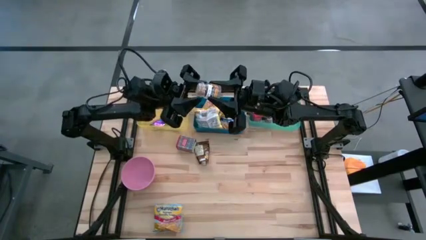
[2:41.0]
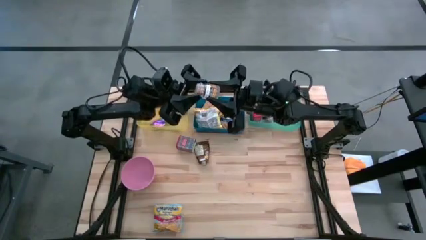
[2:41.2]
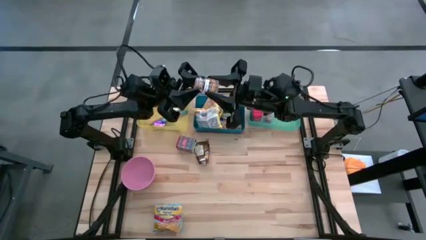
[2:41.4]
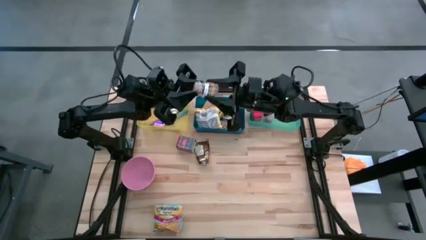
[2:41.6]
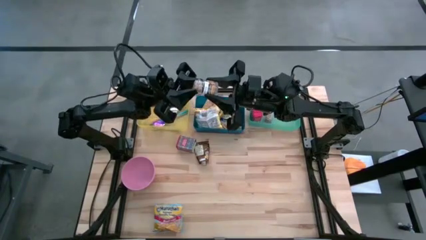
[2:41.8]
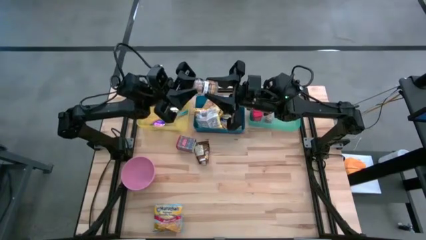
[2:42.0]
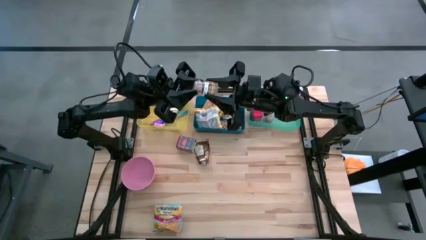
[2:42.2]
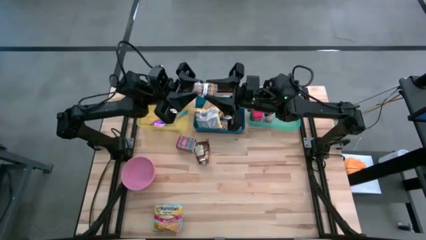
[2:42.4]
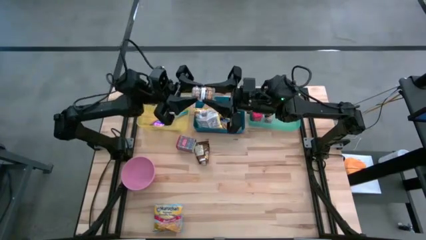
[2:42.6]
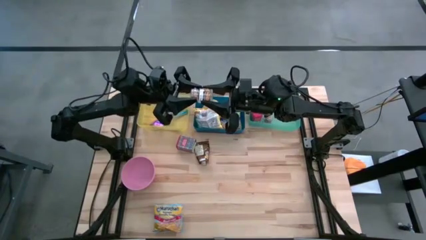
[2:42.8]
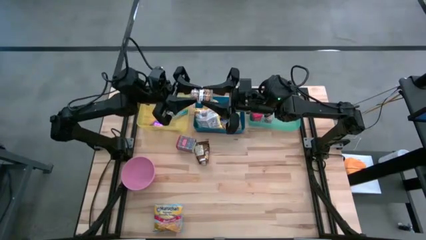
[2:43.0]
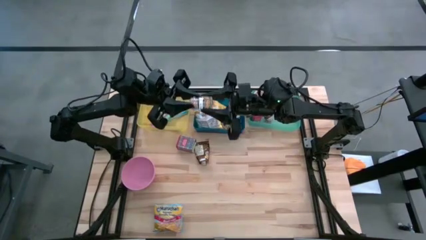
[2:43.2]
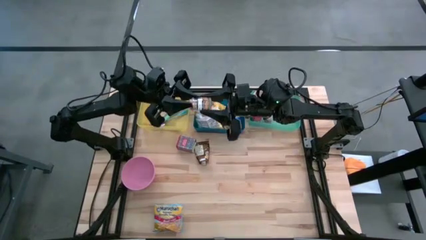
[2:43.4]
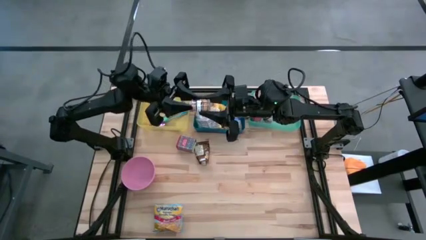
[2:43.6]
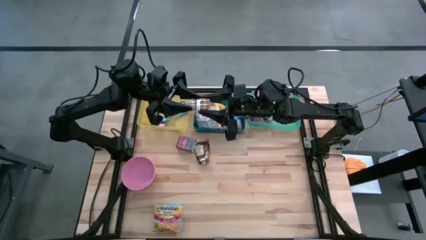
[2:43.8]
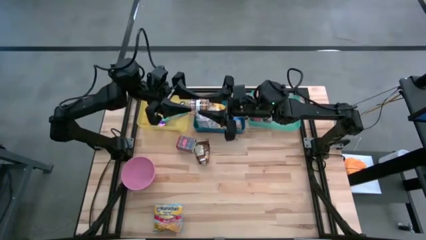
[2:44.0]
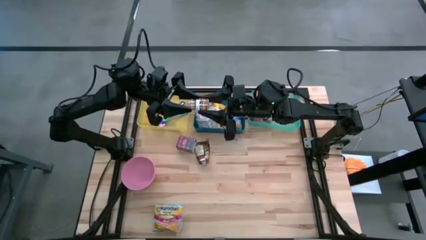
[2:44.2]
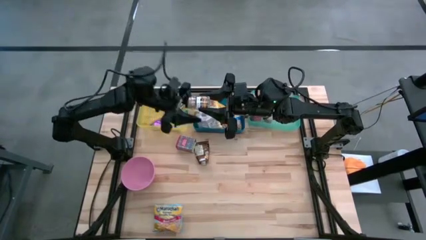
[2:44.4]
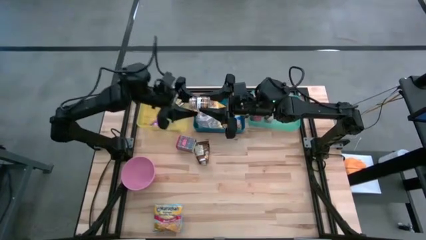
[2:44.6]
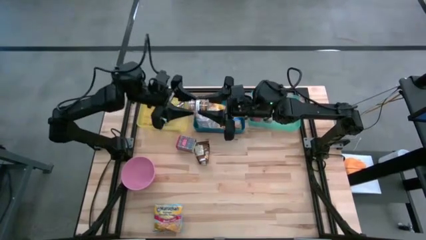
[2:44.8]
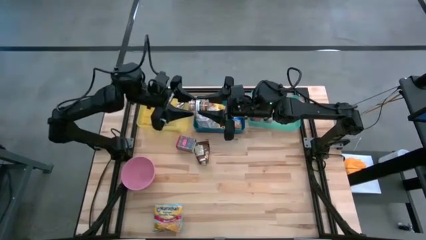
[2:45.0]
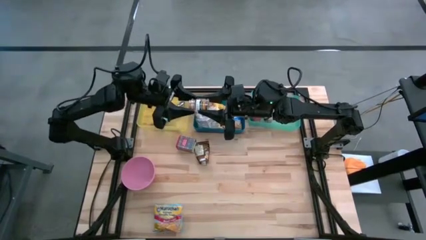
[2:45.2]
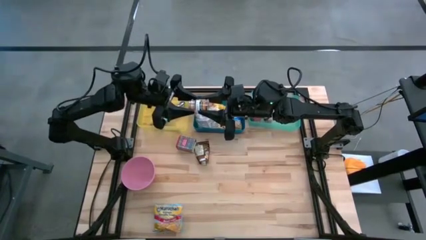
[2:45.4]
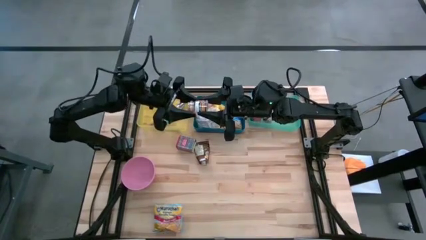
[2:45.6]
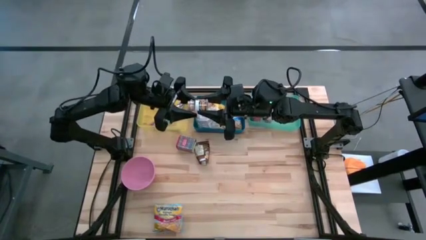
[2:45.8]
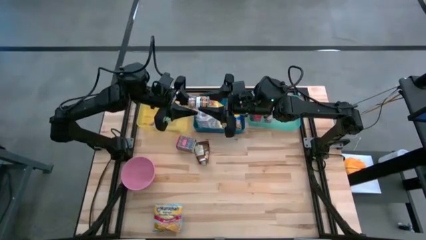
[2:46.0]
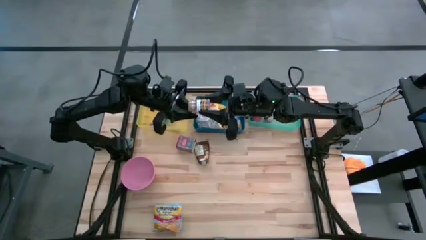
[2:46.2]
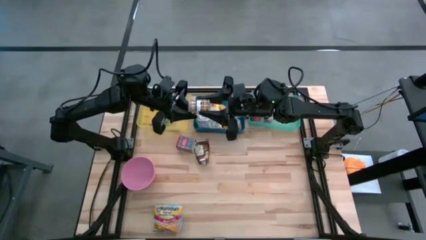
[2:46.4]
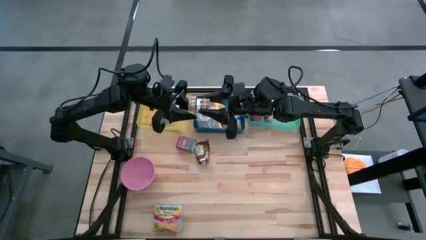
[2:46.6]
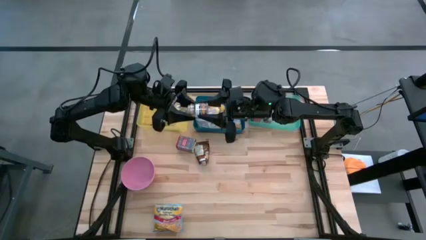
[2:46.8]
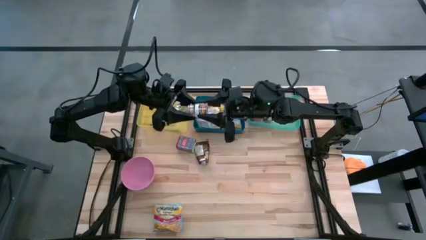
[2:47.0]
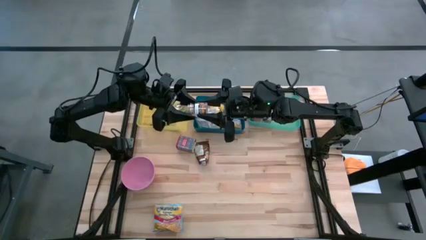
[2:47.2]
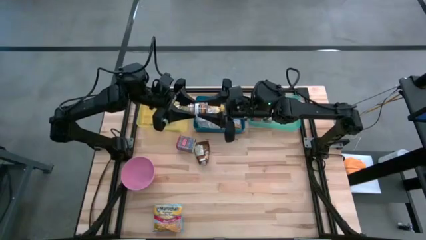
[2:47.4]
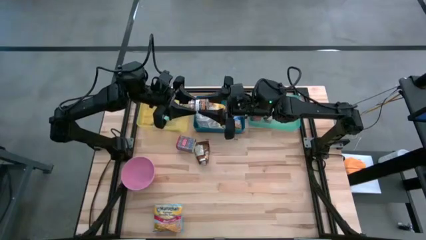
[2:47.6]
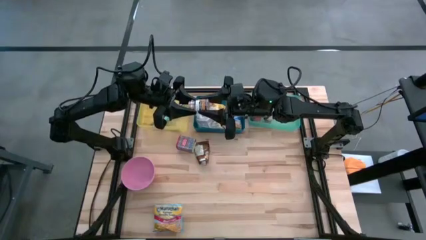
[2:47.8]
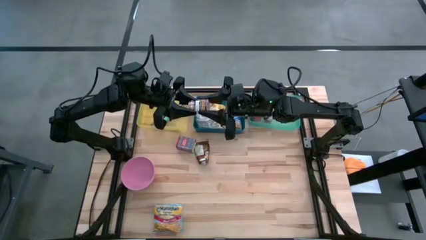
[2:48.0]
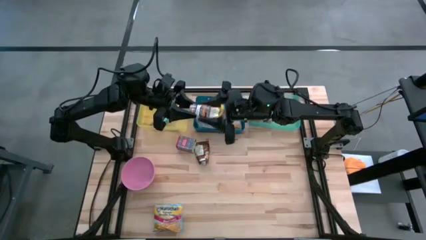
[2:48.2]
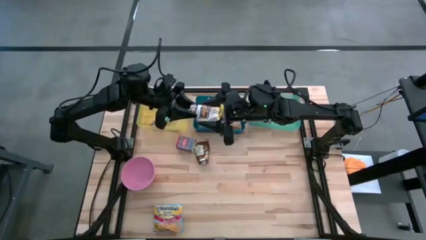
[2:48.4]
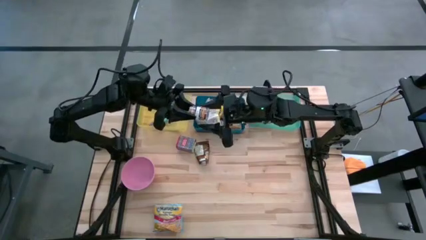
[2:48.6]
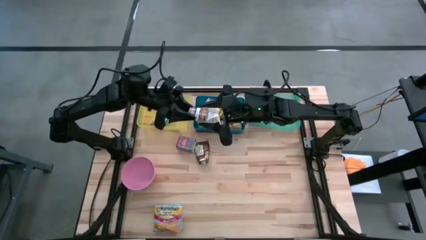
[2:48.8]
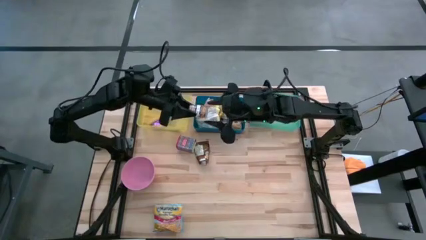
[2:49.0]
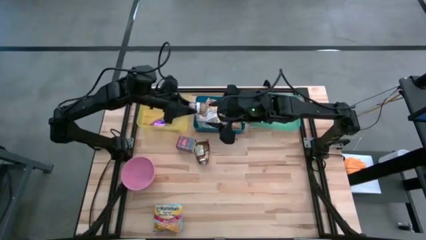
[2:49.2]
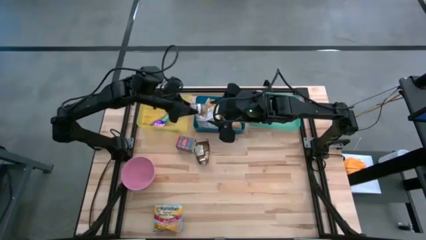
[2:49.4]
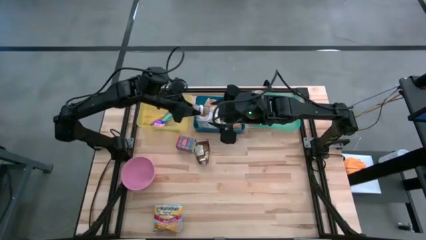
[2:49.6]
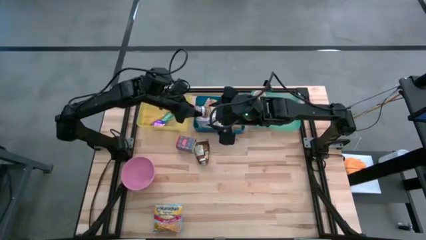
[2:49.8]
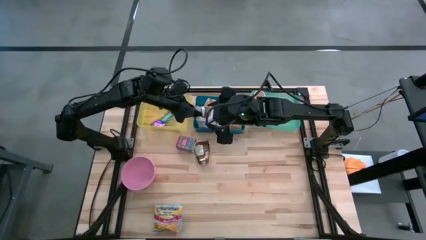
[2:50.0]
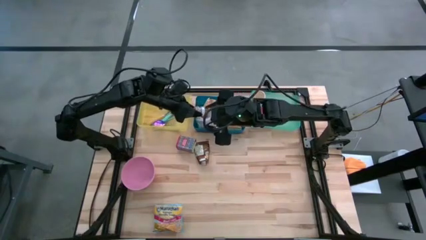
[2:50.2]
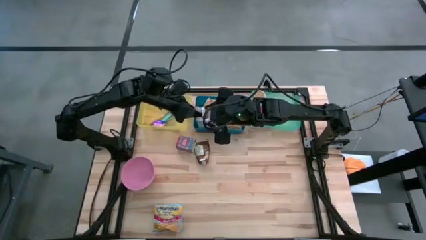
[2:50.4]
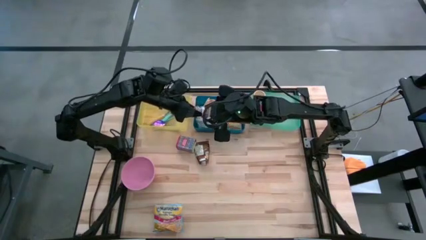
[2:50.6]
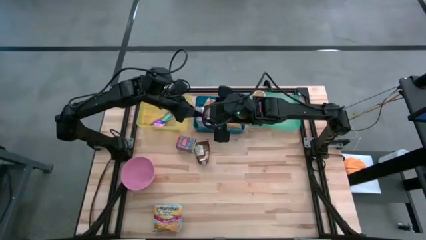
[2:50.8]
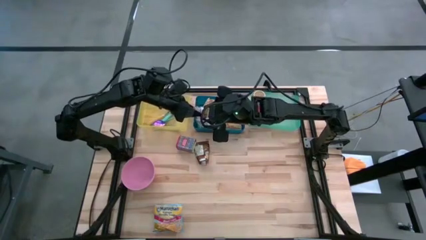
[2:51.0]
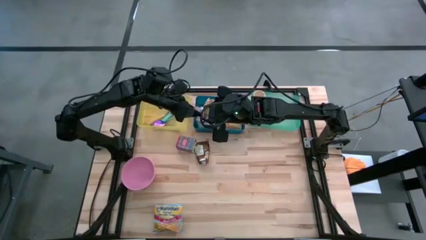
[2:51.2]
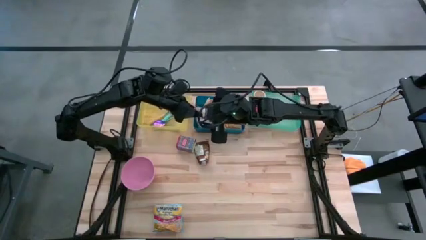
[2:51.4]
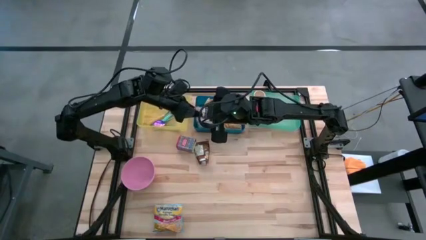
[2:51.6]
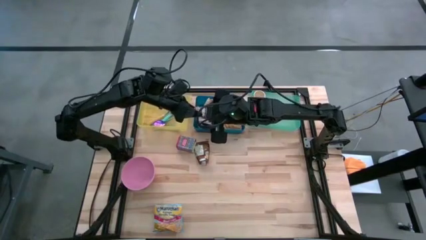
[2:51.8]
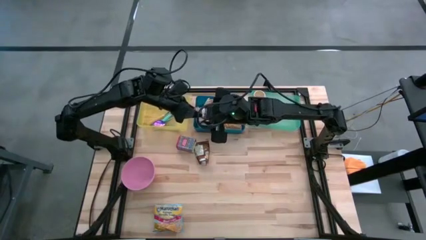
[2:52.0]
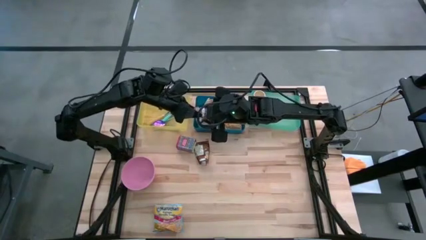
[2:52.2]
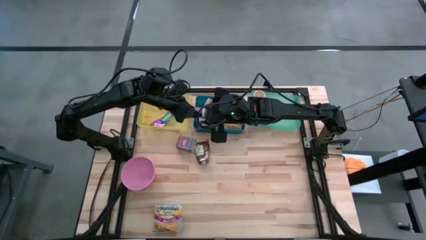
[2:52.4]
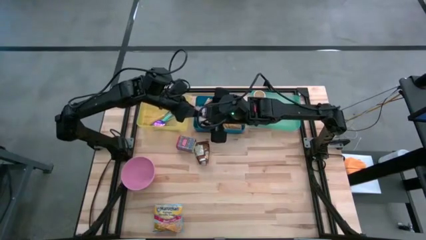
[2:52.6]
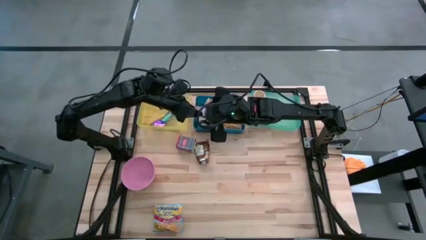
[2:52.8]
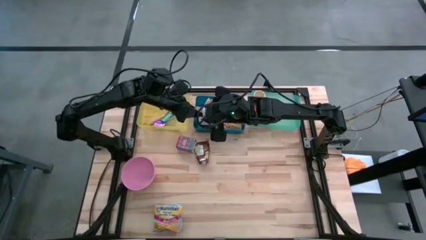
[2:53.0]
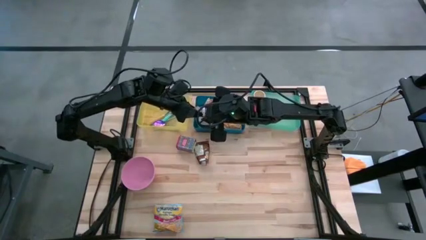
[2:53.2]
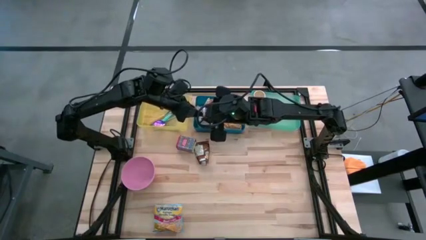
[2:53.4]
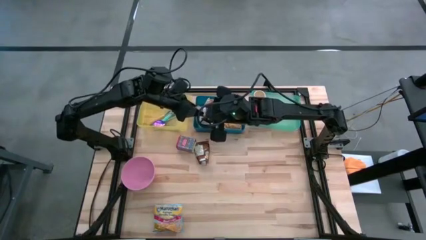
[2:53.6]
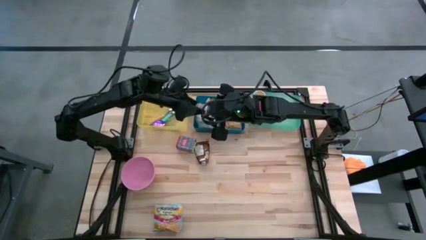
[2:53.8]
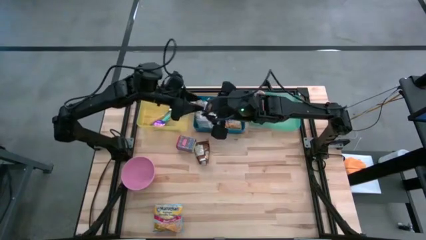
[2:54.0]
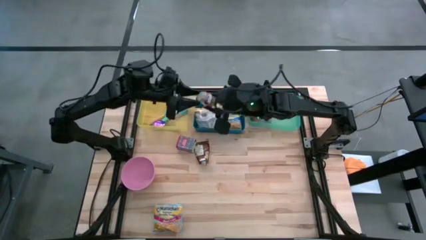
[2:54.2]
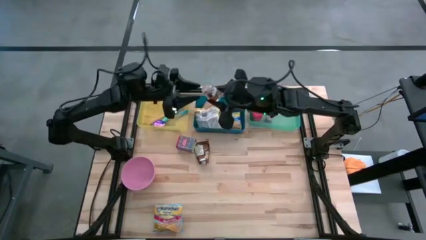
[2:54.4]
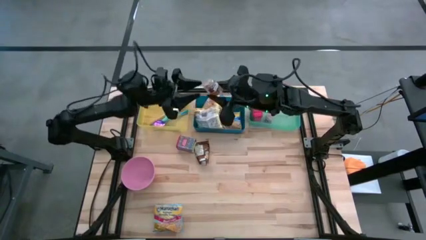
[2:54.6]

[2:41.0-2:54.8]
Put the brown seasoning bottle into the light green bin

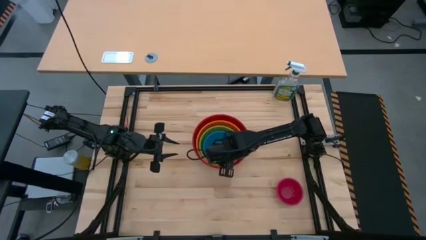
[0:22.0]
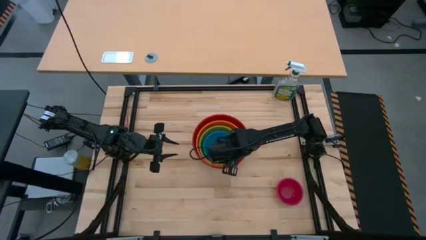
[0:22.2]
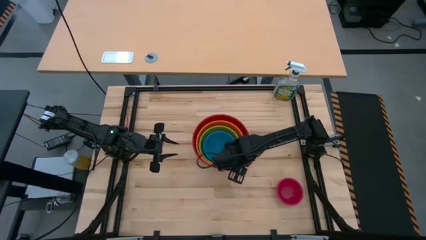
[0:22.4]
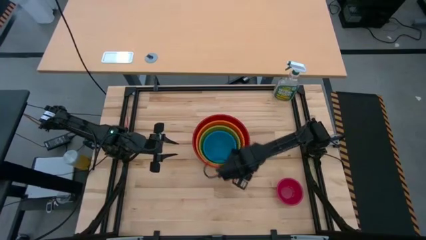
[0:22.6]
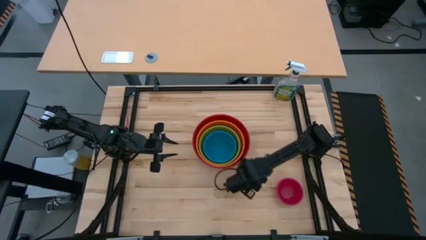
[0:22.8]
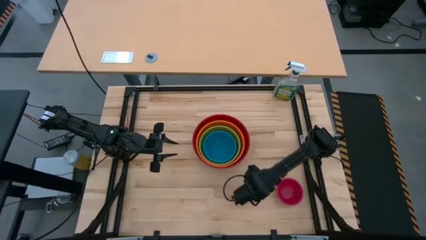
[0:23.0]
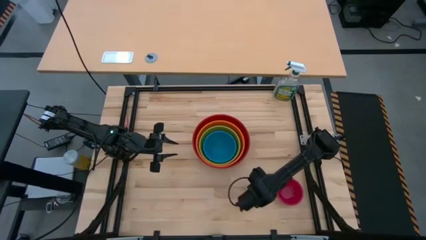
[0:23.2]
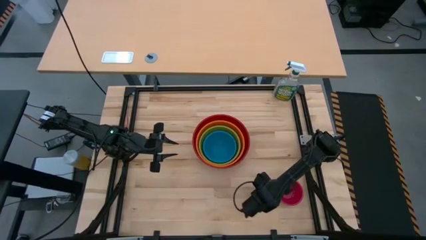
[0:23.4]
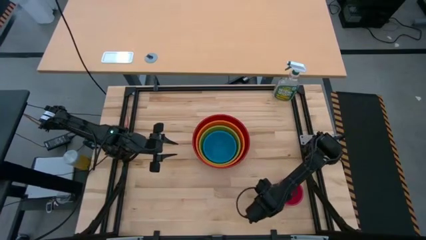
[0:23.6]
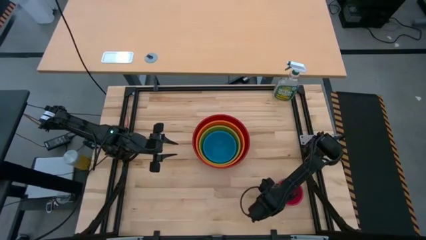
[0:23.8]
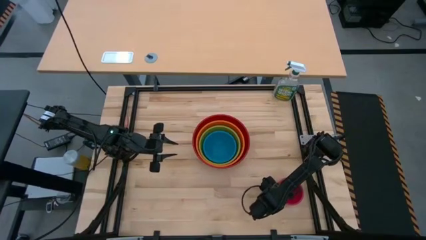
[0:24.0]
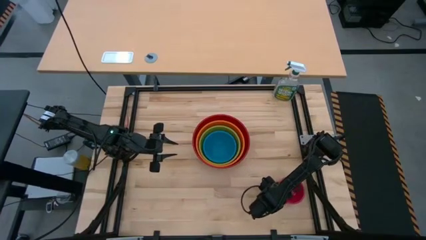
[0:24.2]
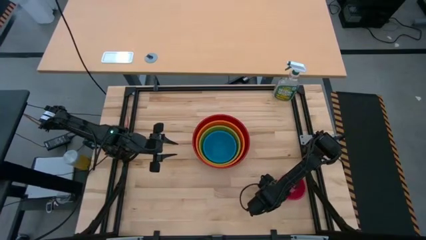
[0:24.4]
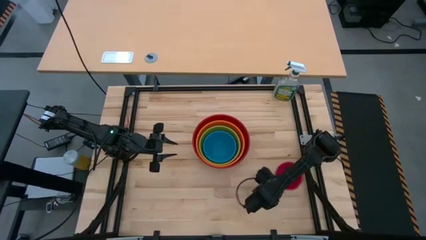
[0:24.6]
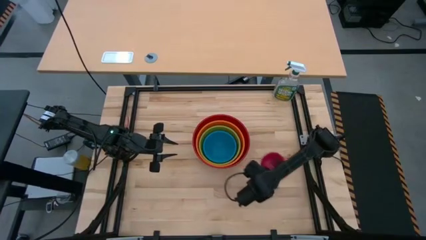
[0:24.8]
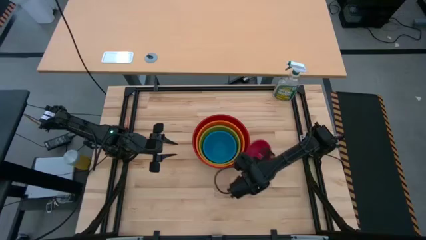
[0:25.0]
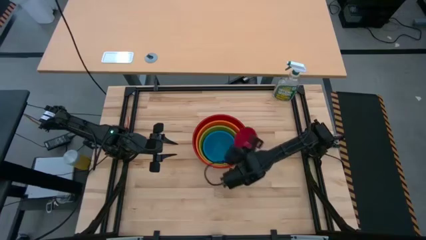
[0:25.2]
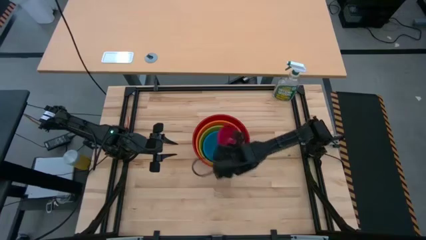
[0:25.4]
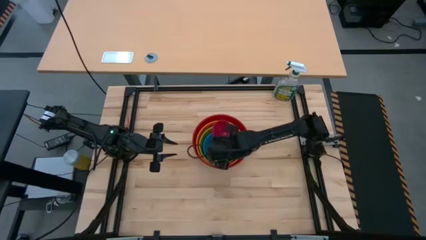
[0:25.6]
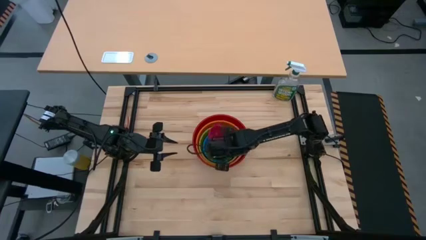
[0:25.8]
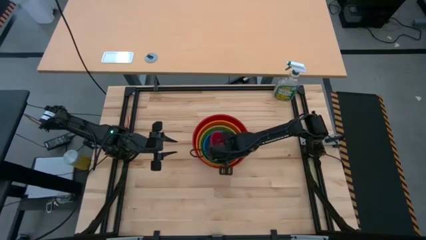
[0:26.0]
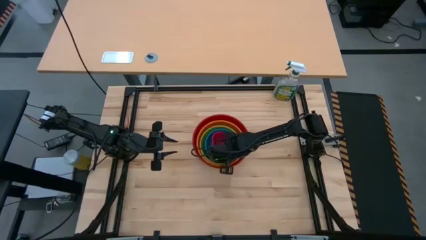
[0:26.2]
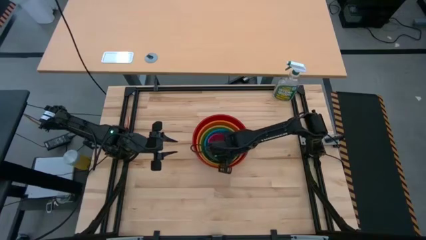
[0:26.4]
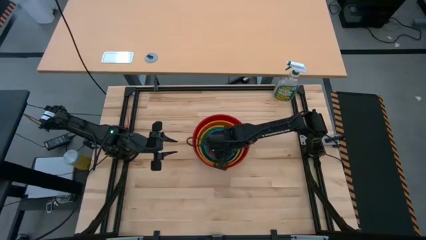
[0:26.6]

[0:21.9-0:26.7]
Stack the red bowl on top of the blue bowl
